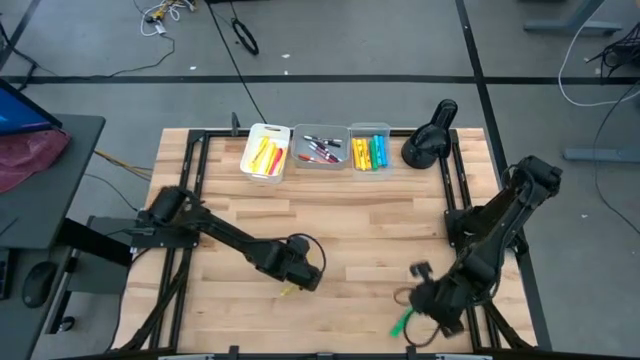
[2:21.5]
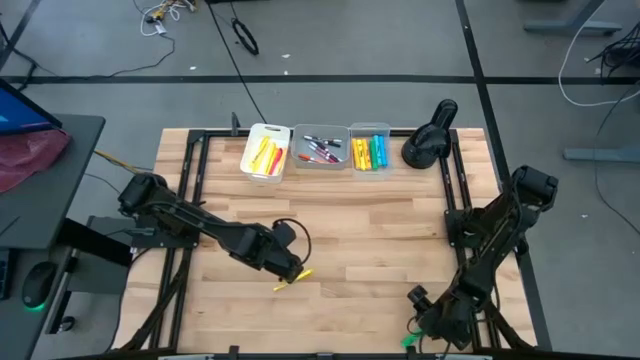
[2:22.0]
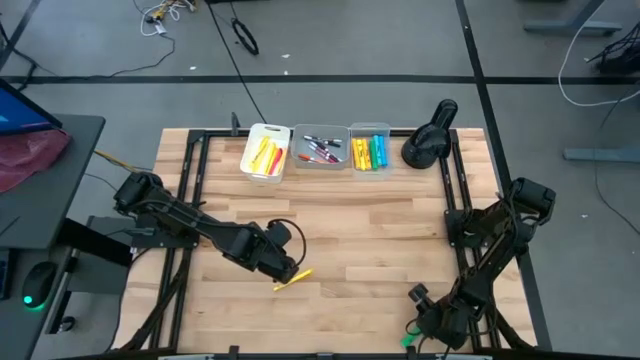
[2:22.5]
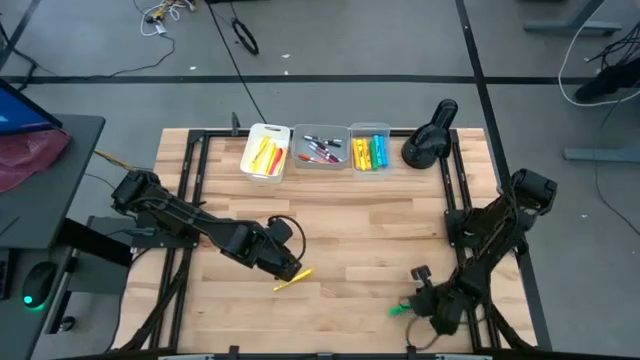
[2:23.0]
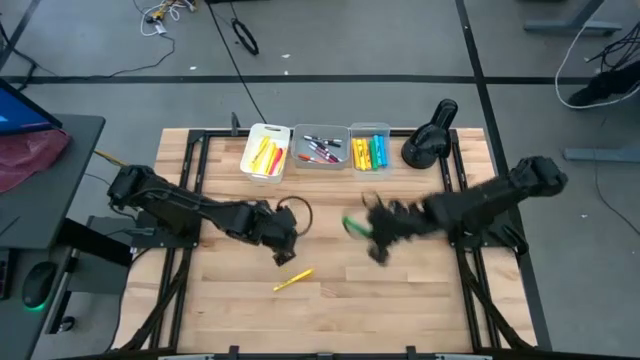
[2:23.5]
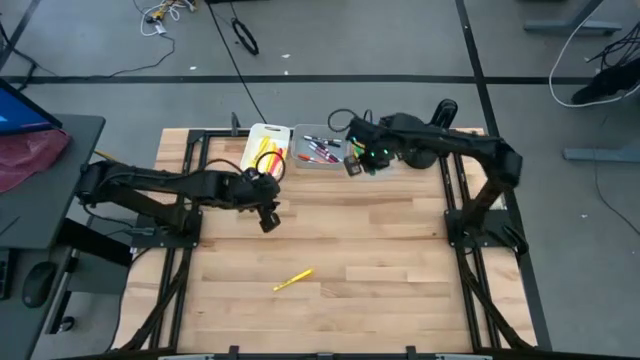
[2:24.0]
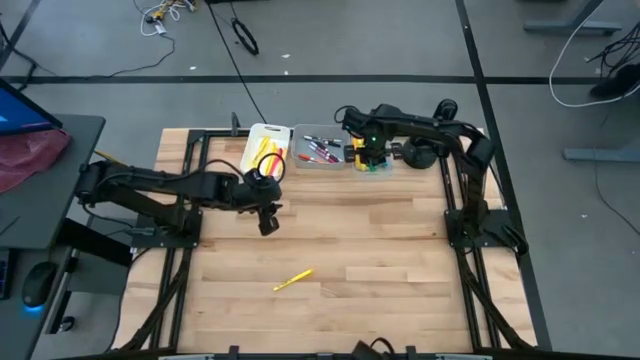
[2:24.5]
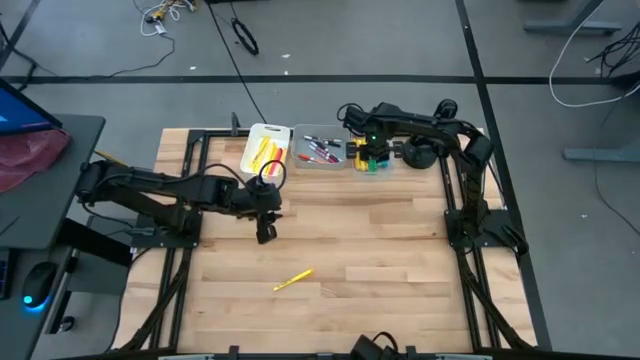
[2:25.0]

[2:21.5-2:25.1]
Task: Pick & Place Markers
Put the green highlighter pen into the transparent bin

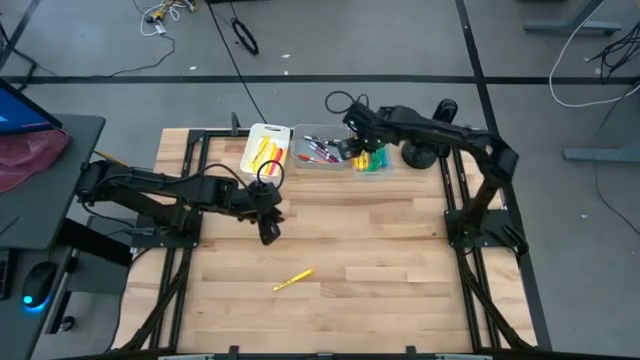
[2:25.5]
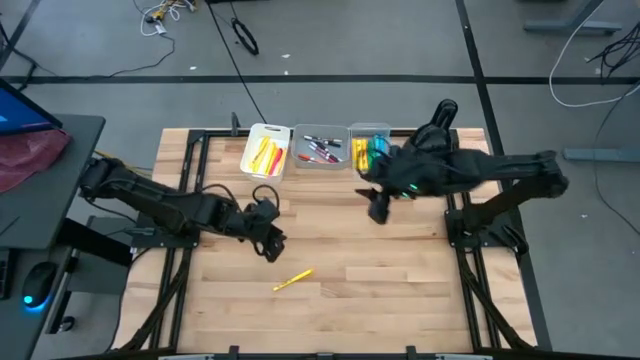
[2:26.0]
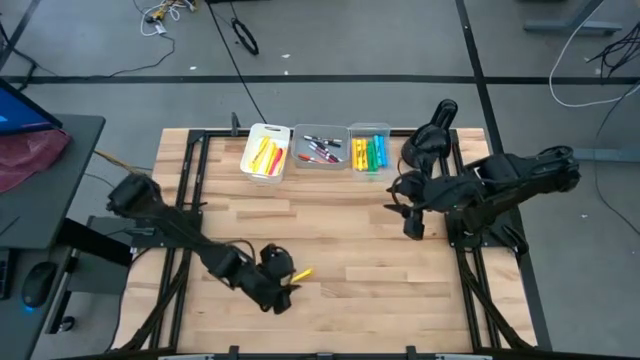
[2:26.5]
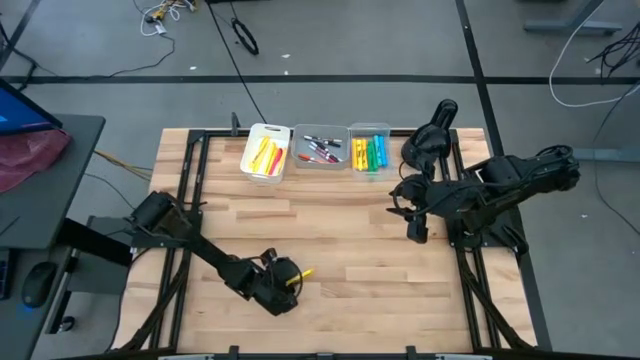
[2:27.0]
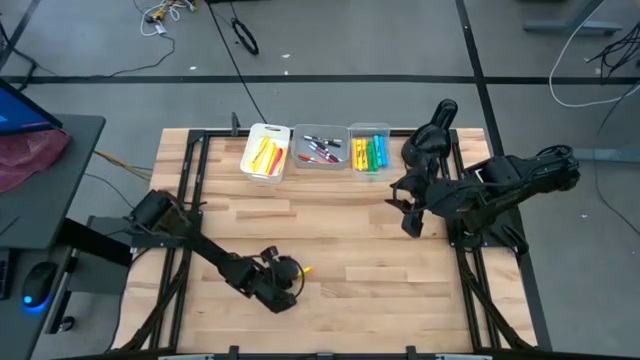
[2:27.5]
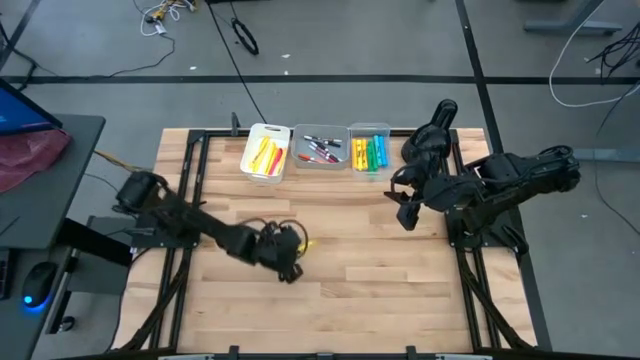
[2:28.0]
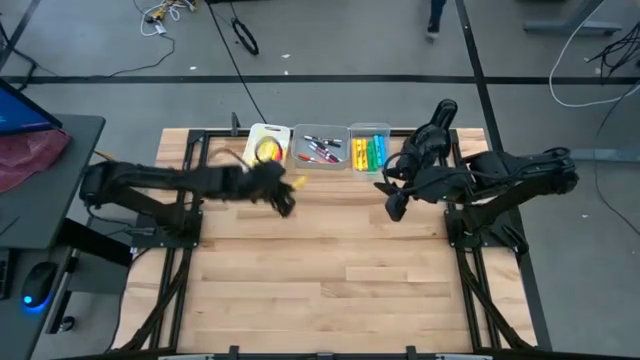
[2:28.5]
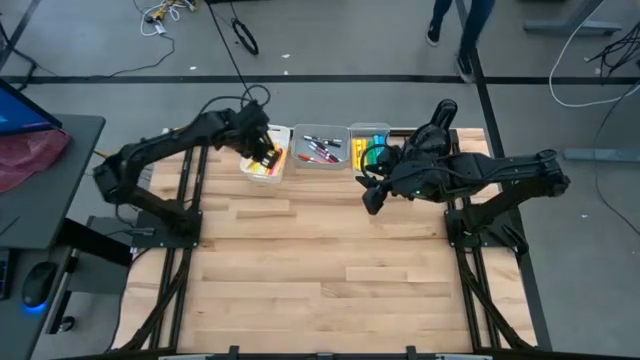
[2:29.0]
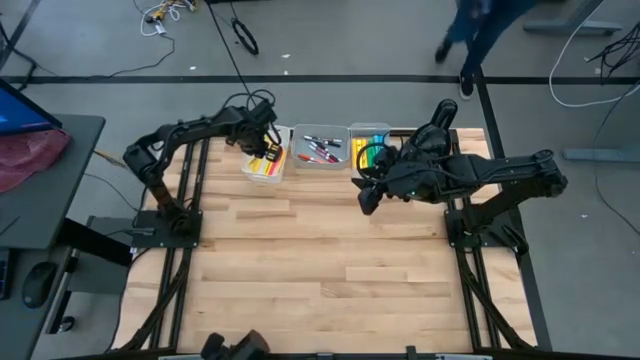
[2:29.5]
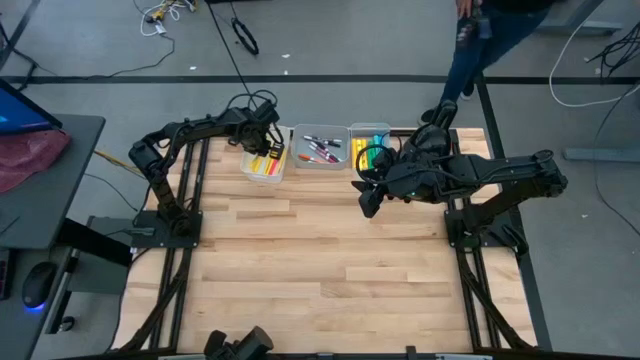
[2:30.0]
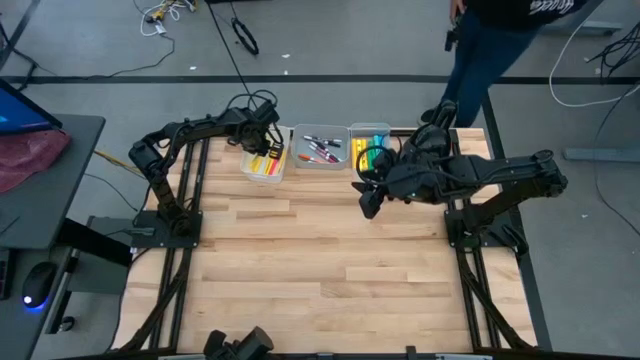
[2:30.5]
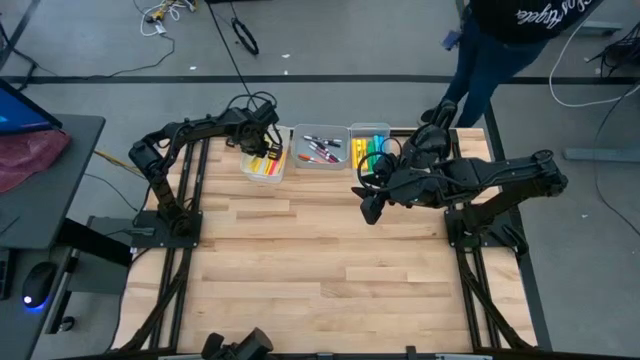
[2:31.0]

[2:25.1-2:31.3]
Put the yellow pen into the white bin

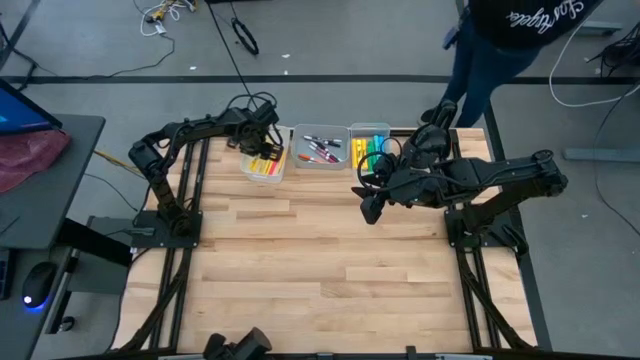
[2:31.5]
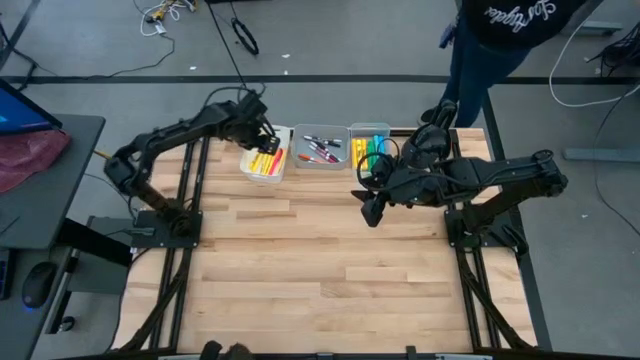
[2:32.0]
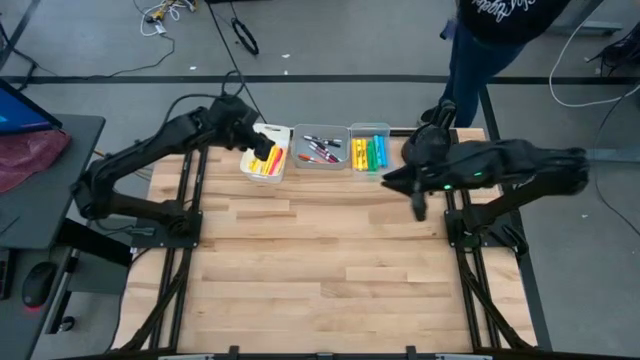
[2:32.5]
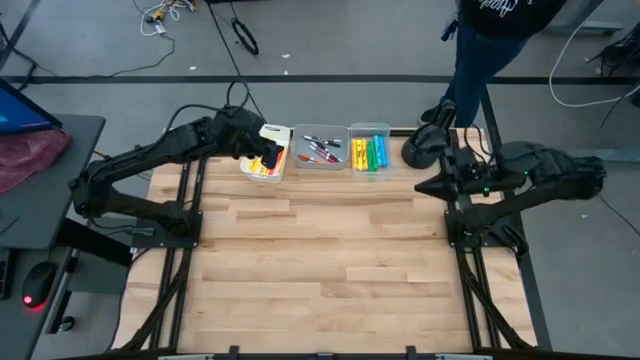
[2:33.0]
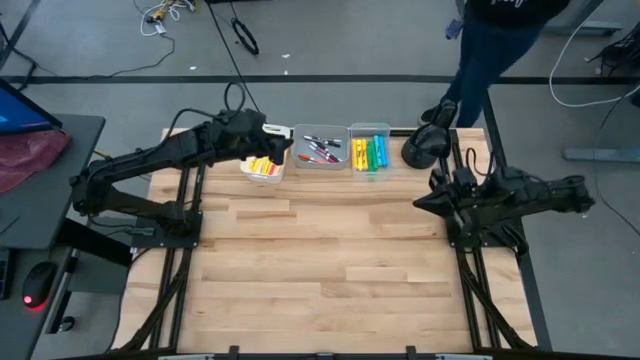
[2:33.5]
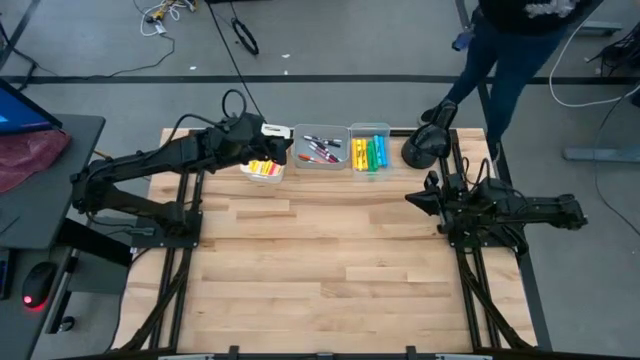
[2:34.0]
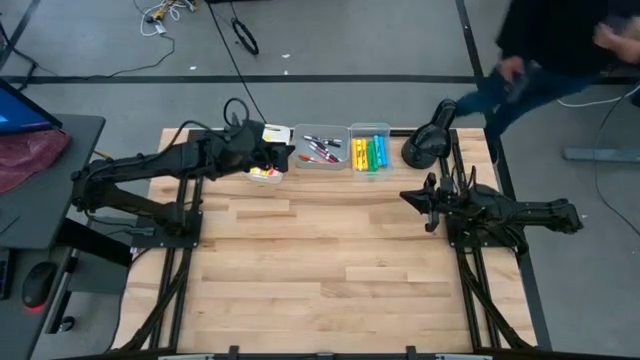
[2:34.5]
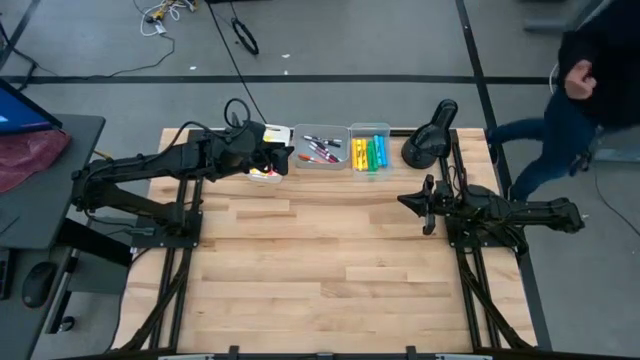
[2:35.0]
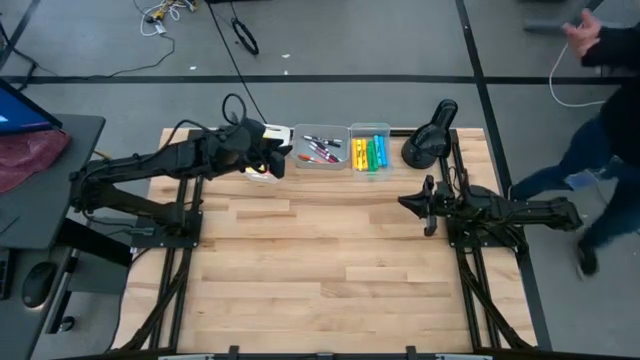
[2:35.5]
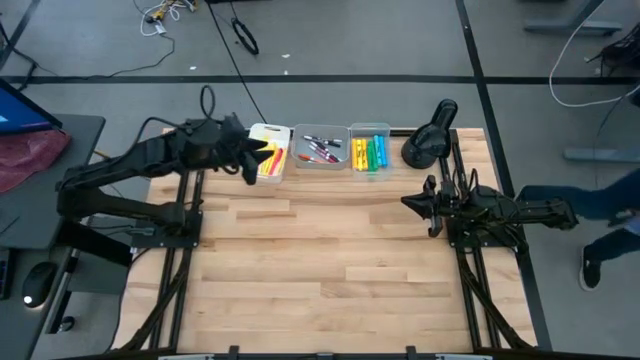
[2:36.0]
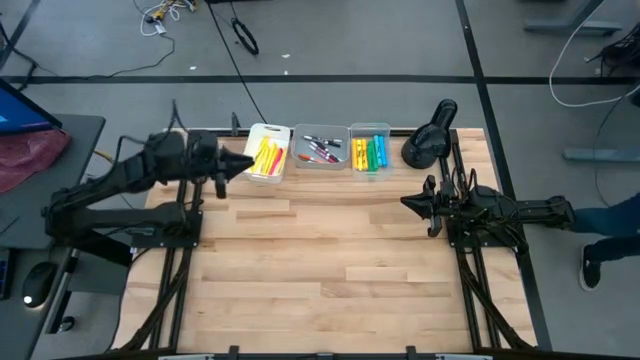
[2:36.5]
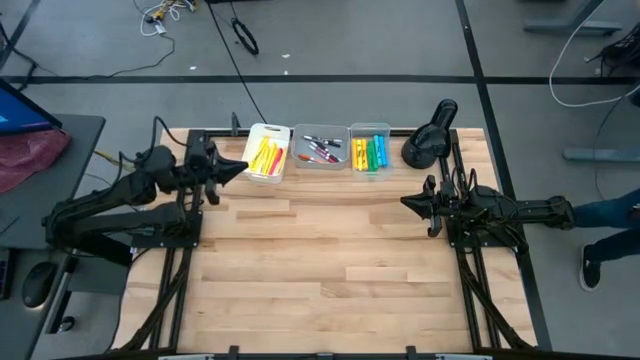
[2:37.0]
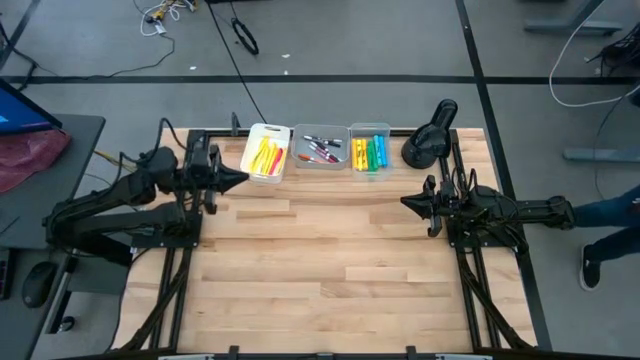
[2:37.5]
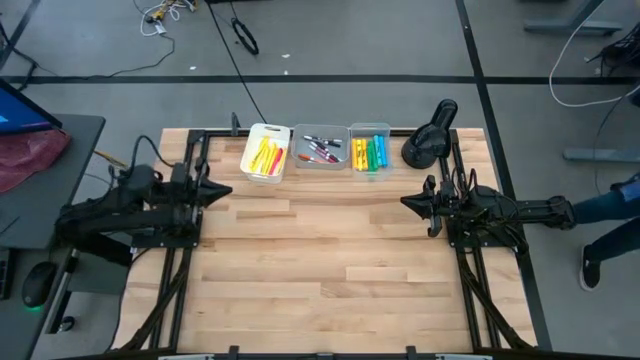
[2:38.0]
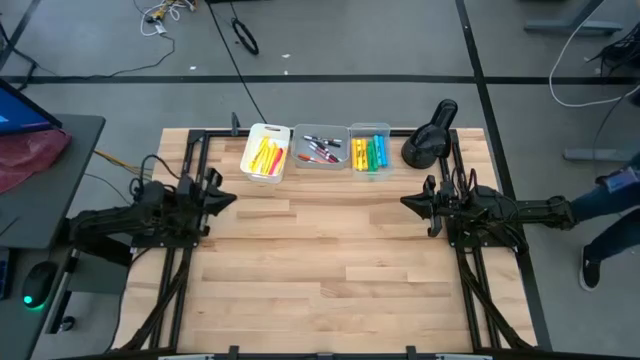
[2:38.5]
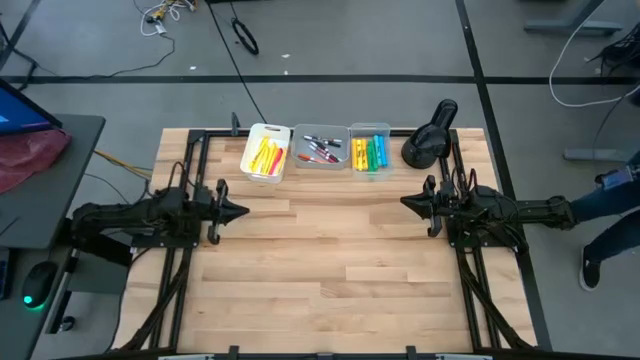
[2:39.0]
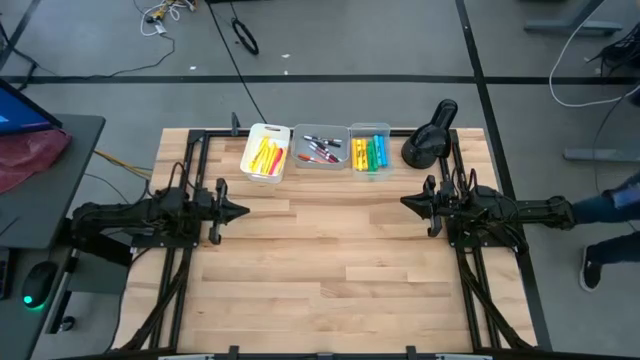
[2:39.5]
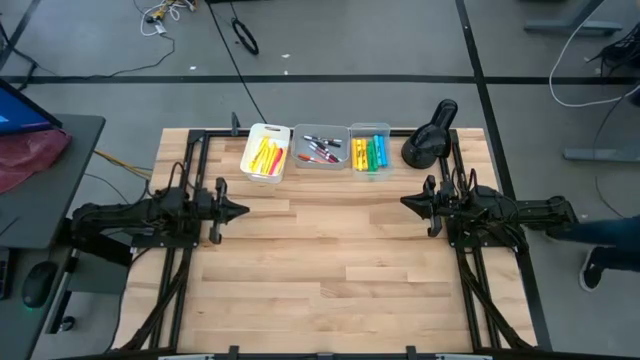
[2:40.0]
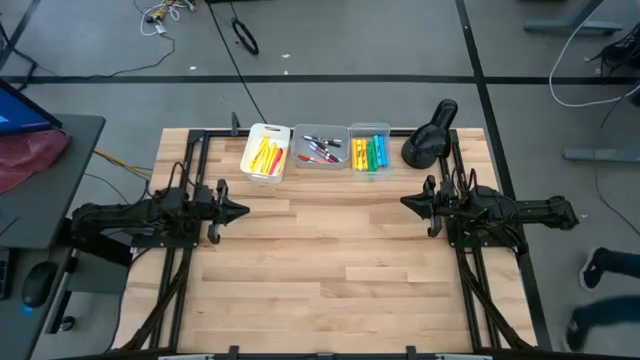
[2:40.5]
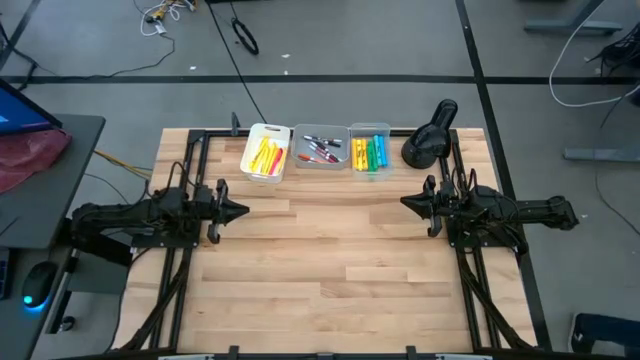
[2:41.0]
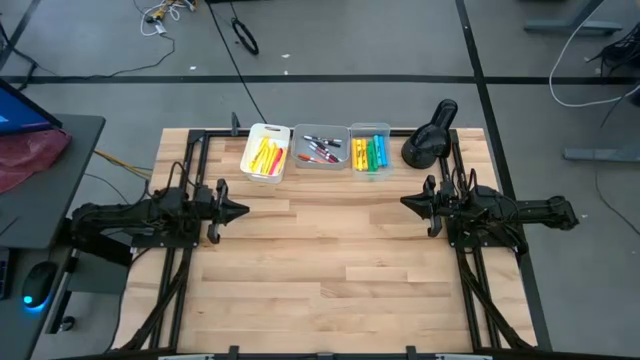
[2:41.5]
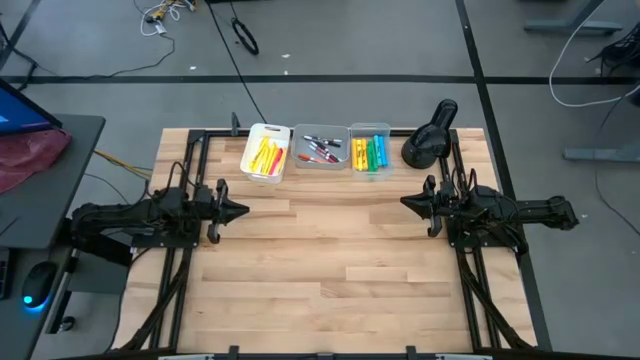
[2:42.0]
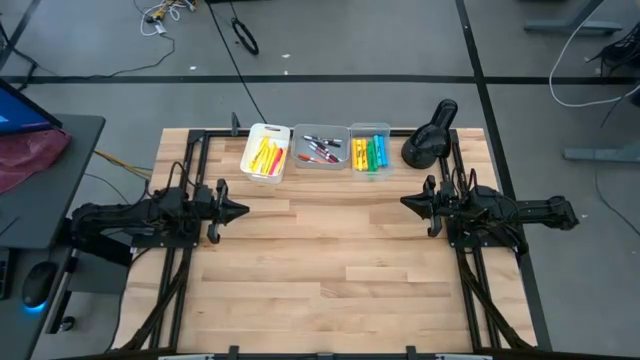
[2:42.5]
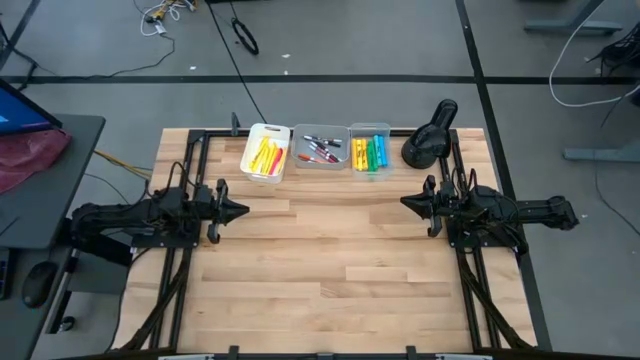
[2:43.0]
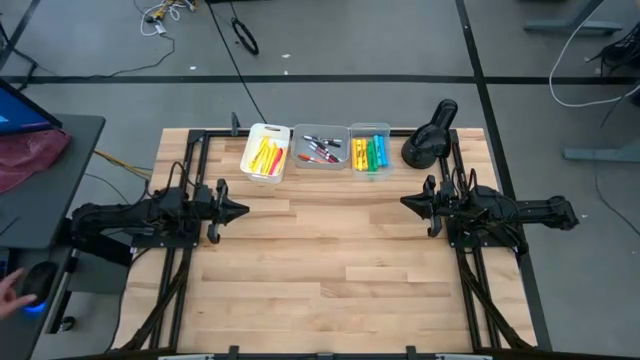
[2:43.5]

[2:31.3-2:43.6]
Return to Home Position
